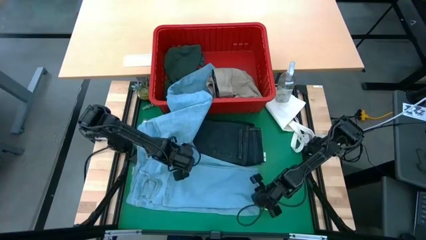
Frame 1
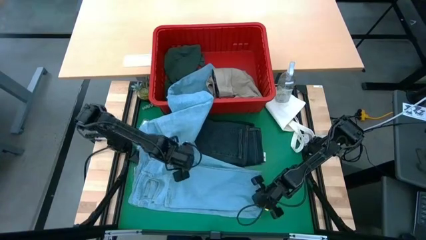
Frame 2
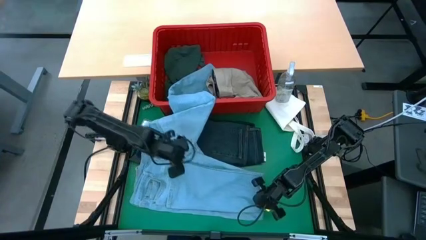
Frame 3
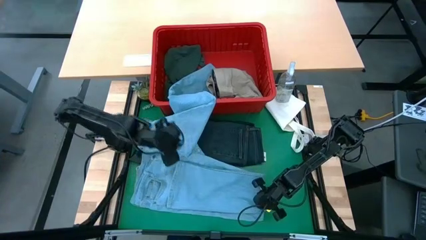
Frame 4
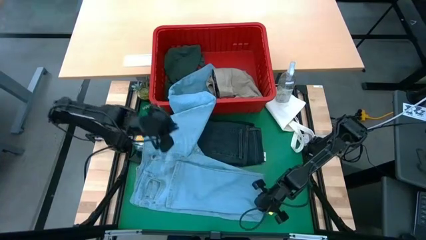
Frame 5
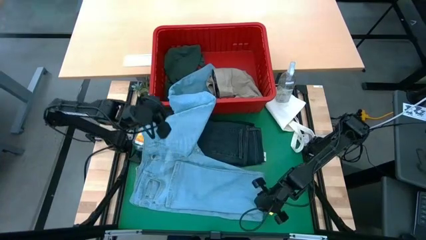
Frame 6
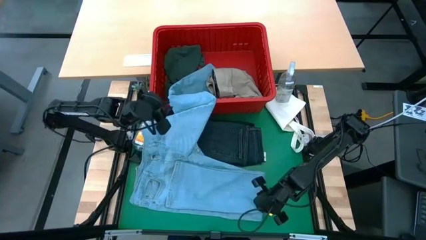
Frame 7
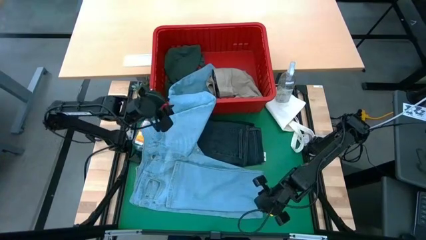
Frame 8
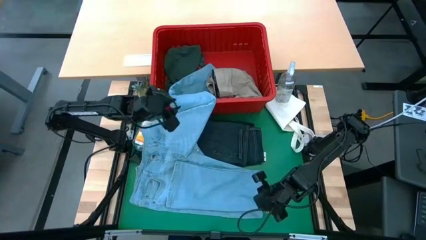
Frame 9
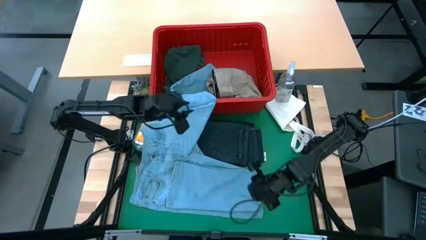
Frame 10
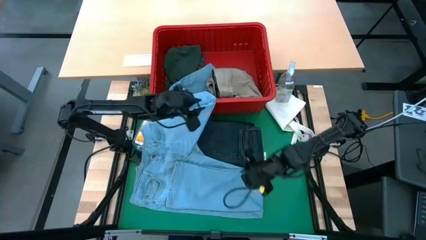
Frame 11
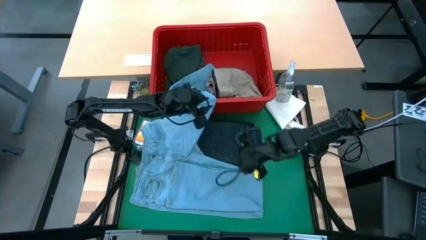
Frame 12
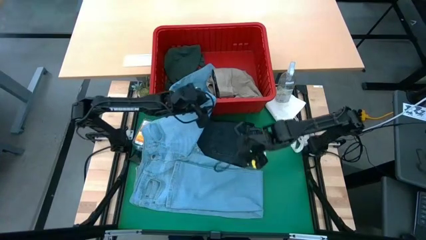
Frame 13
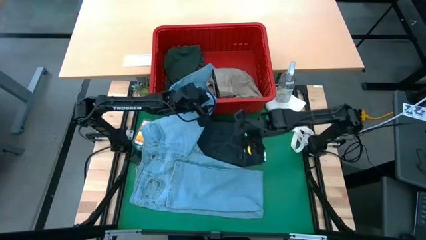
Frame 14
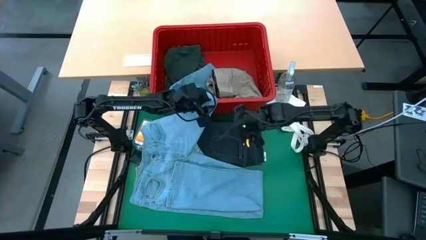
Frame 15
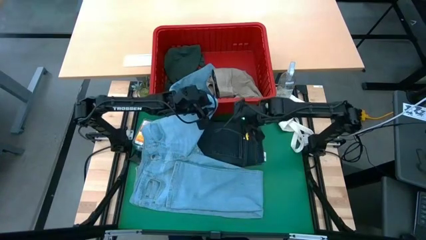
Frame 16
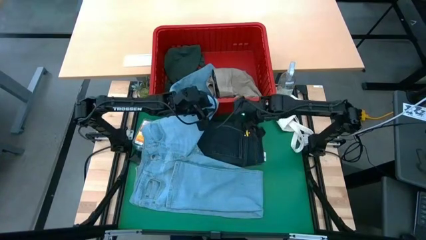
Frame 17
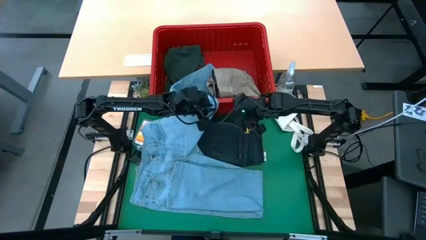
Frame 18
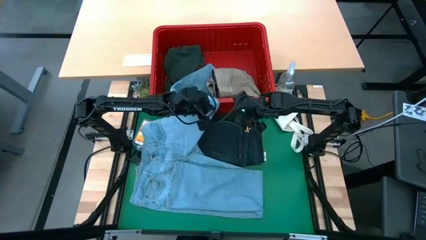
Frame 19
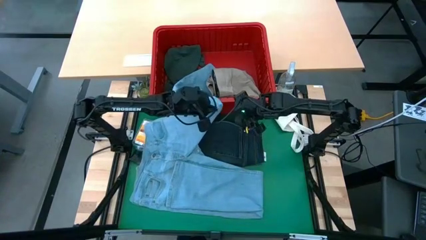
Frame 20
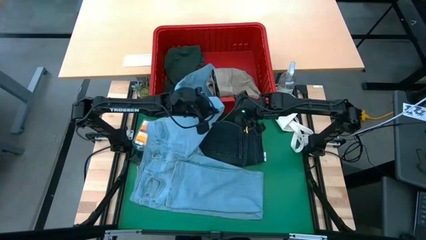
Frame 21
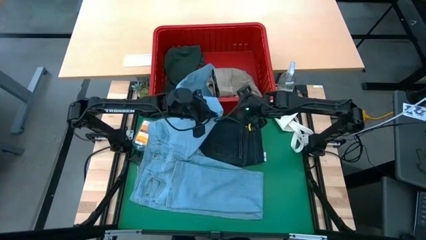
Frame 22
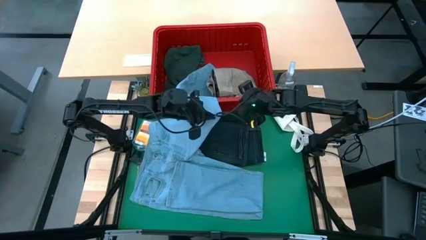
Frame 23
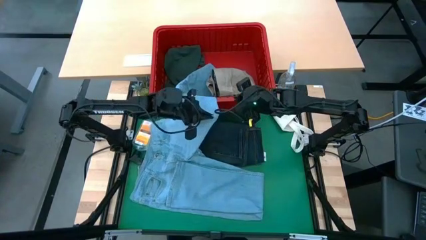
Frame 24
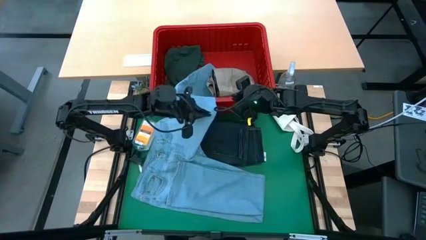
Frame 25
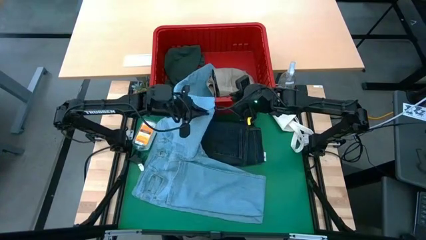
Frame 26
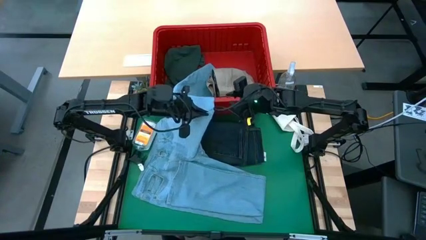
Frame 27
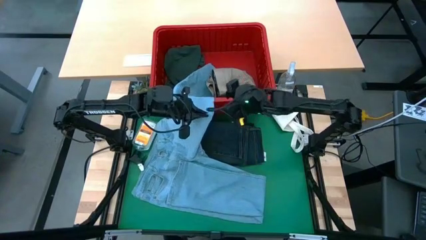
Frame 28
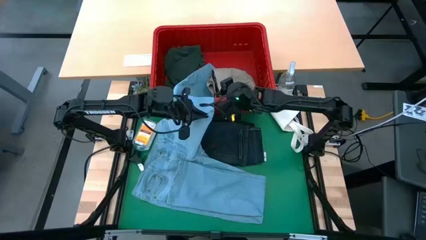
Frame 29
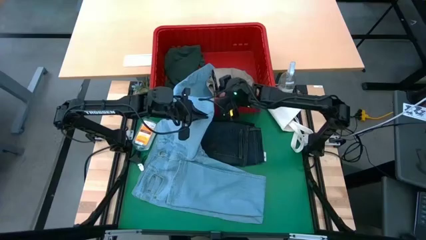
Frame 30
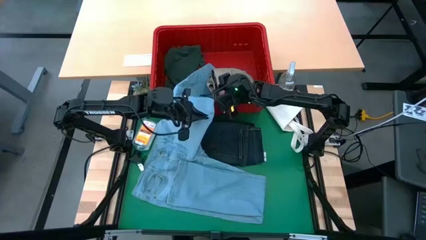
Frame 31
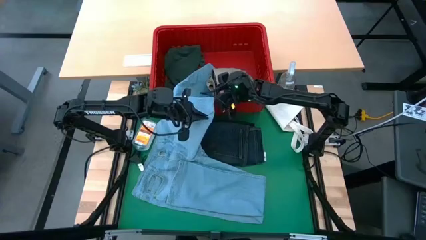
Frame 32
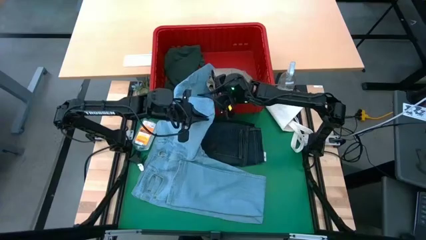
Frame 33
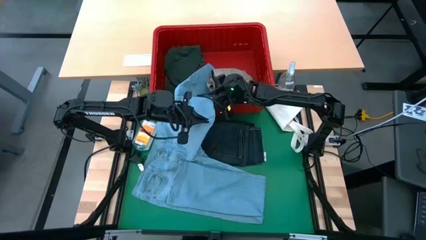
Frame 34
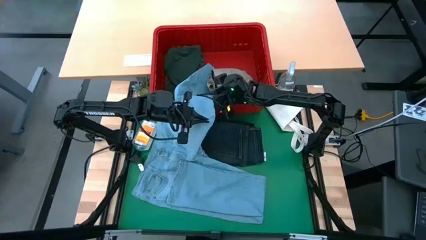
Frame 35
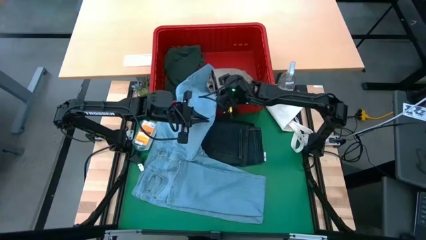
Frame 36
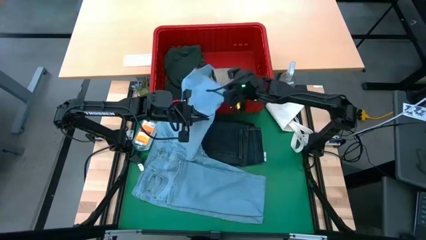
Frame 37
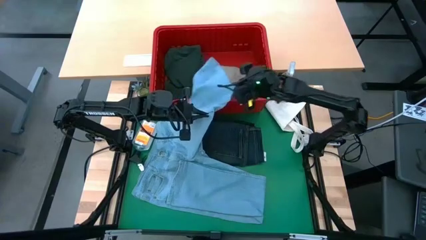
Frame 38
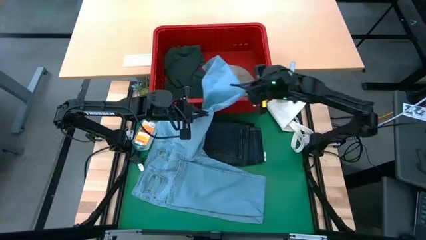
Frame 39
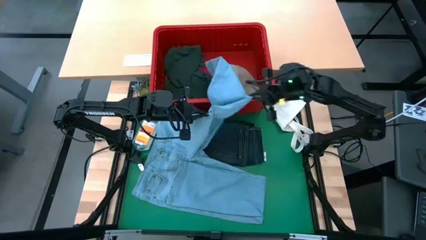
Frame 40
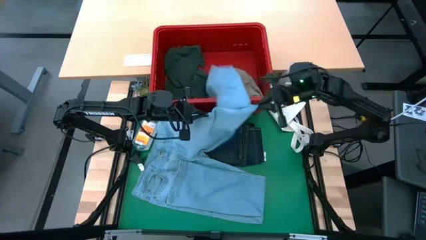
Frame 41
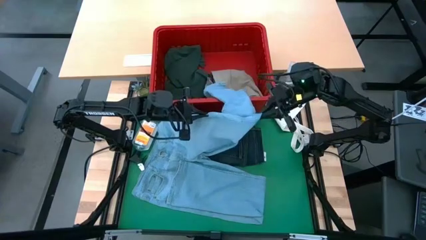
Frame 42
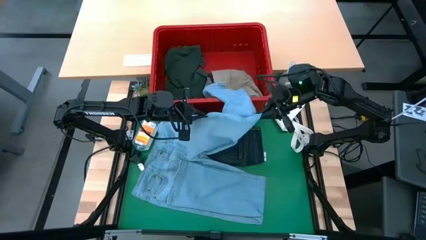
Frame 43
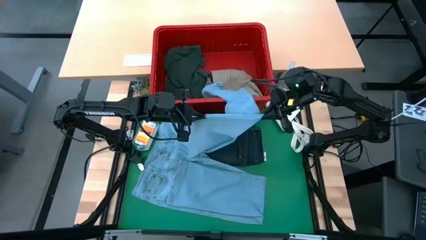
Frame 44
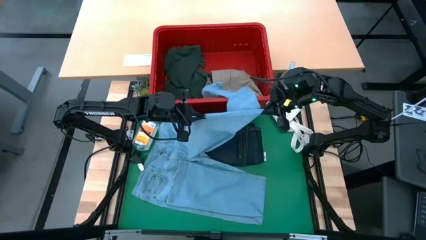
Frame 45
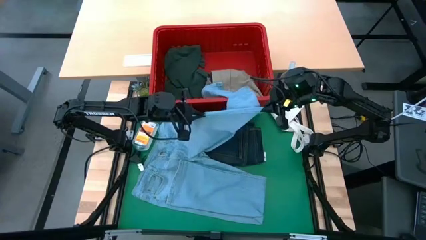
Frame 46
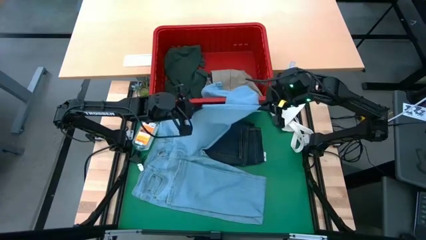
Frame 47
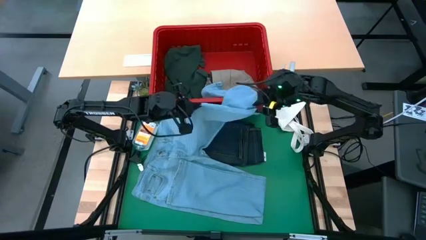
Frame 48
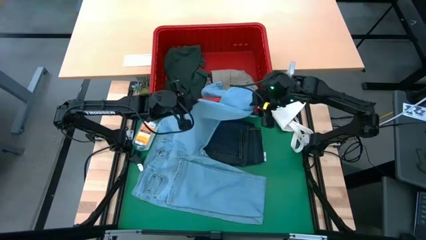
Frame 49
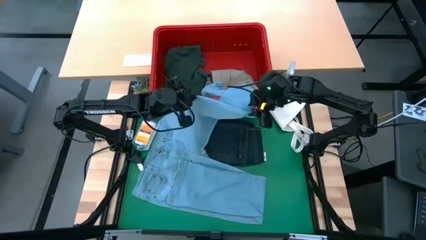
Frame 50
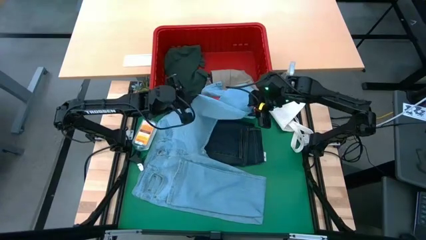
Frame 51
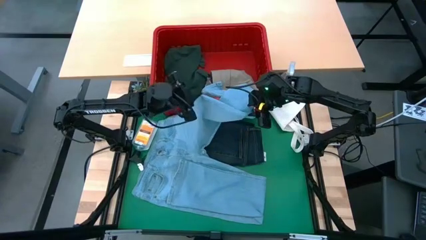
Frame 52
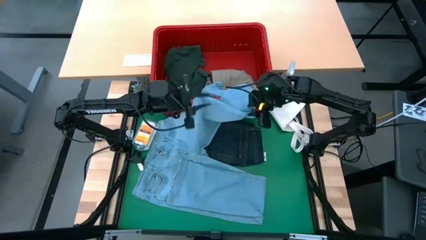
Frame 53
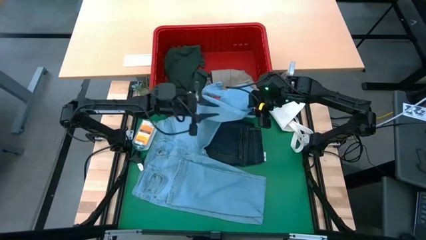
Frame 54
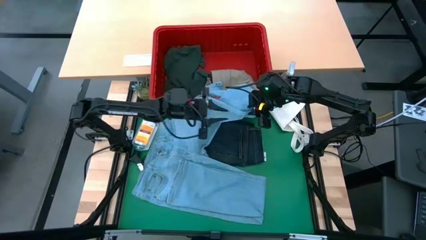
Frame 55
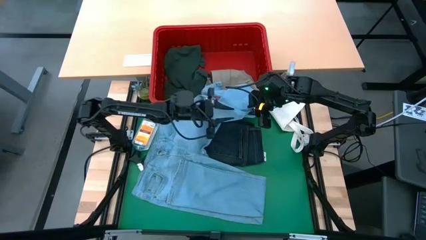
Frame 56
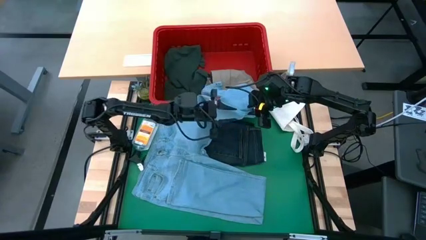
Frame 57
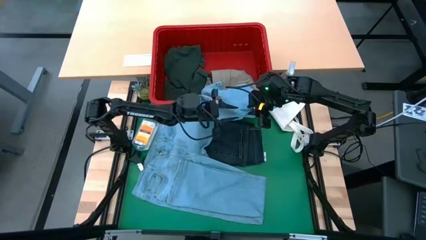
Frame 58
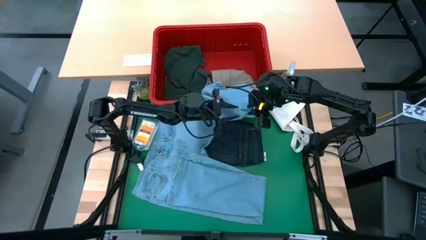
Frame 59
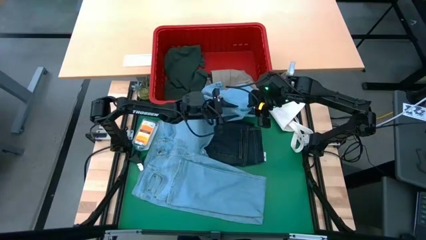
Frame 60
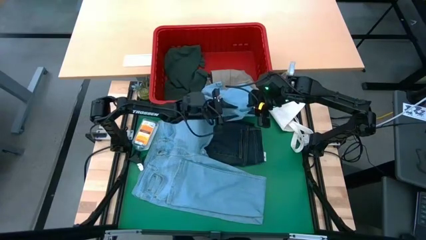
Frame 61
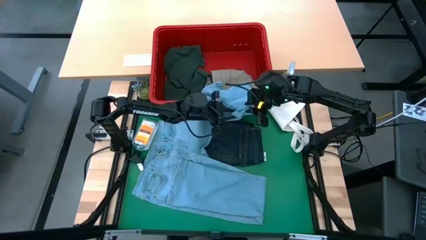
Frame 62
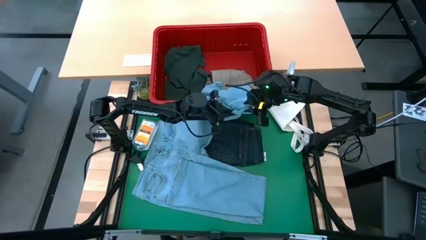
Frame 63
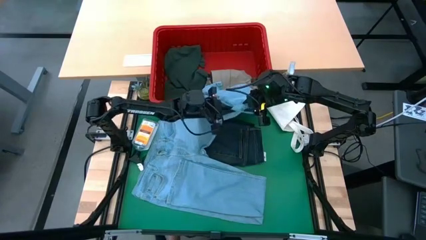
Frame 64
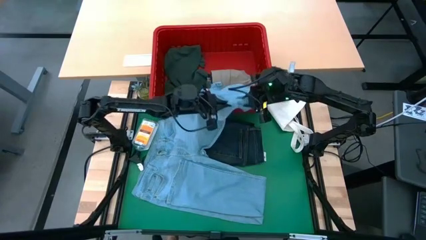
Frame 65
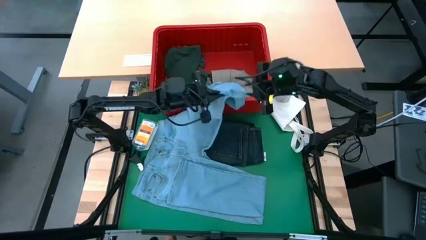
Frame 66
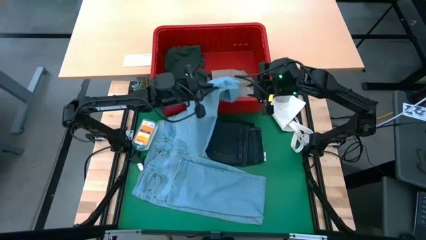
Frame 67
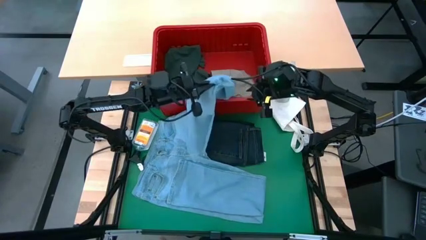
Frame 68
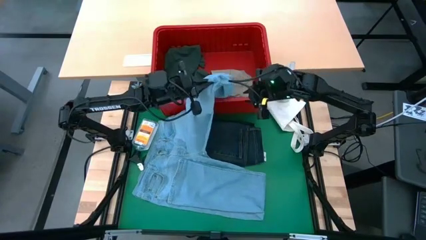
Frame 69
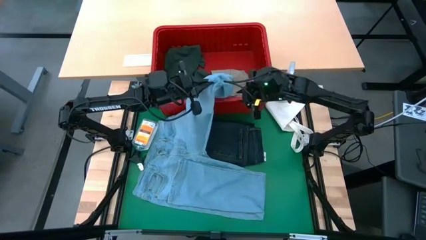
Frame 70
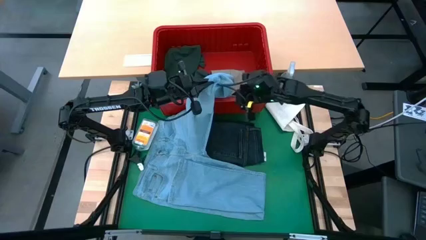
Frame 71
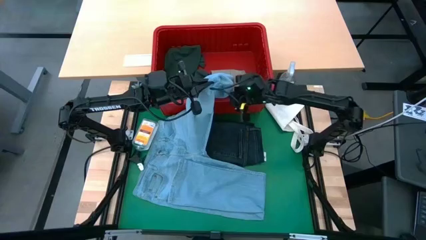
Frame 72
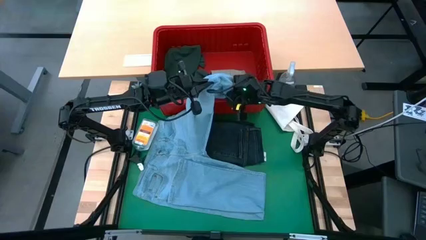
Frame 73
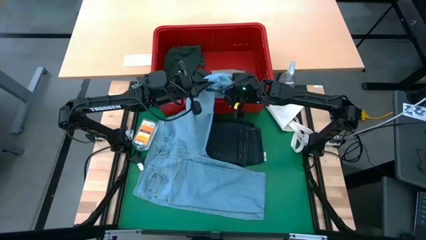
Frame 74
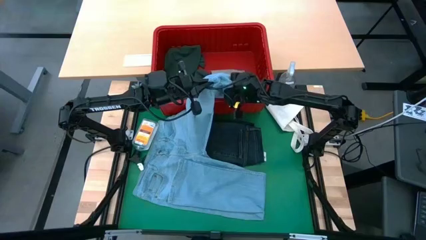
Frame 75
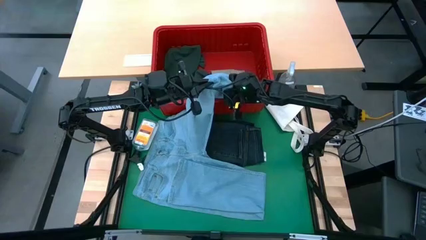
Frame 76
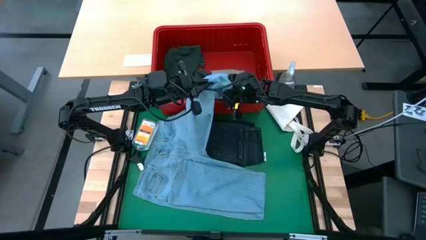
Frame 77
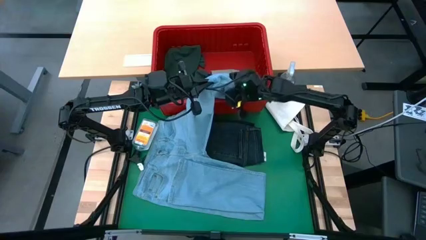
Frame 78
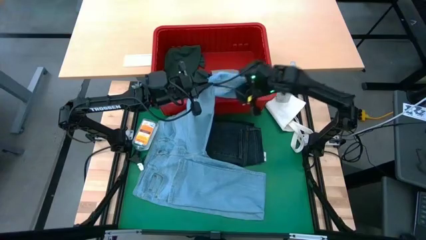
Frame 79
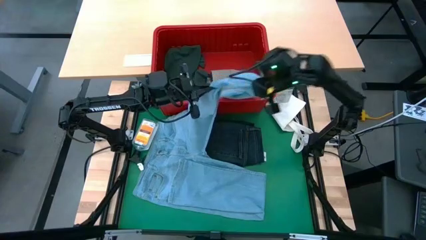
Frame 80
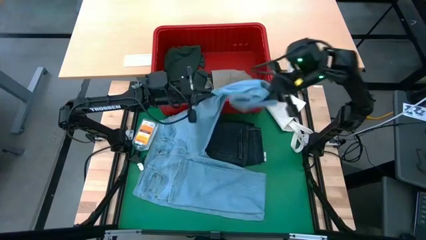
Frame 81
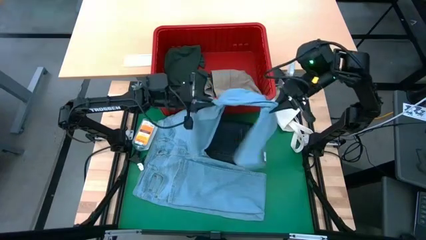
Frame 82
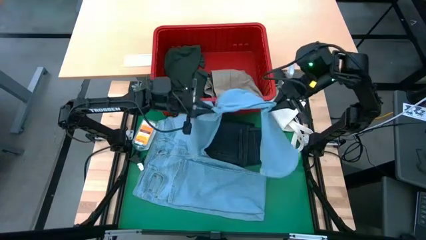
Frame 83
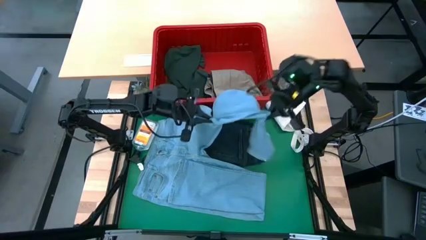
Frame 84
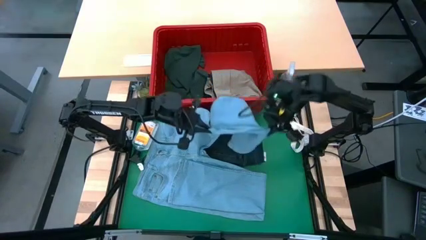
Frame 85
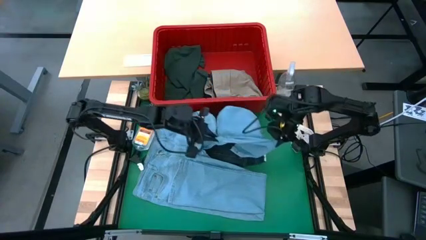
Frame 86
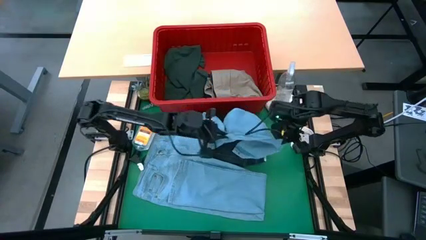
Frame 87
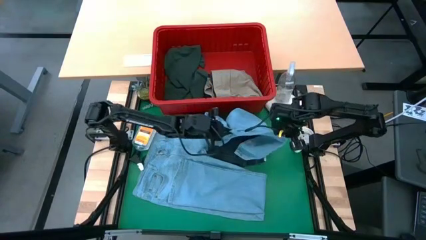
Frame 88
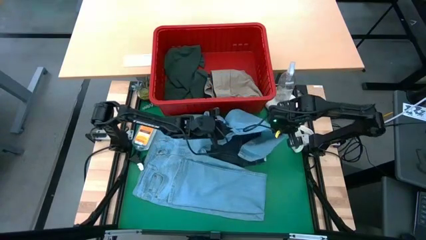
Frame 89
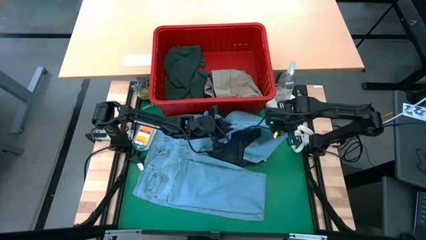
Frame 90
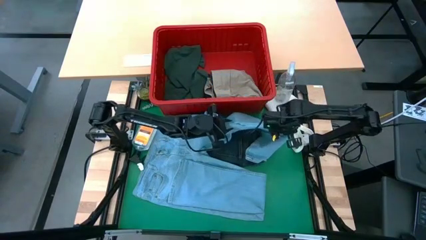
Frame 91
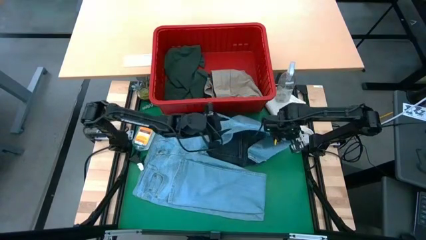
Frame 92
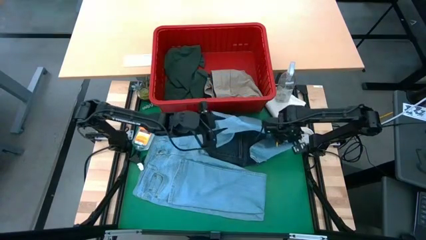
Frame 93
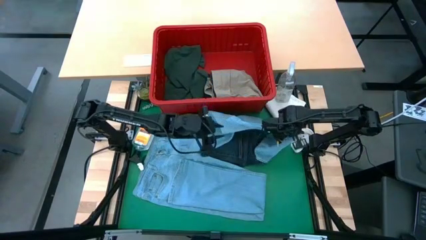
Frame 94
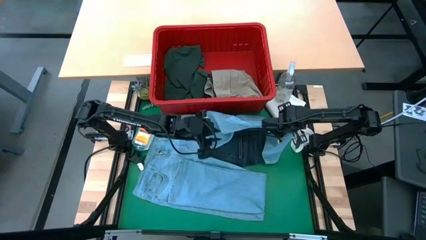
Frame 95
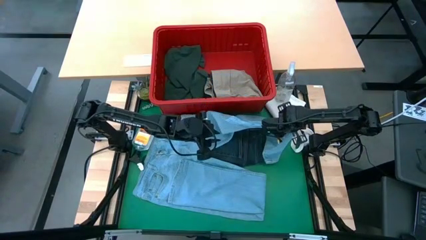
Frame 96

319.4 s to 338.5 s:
Task: Fold laundry
Fold the light blue jeans
